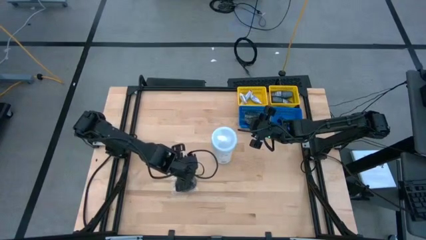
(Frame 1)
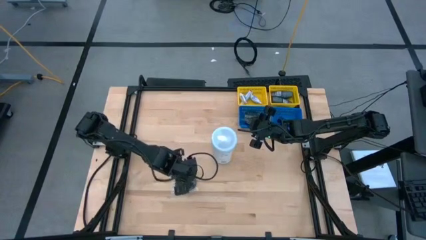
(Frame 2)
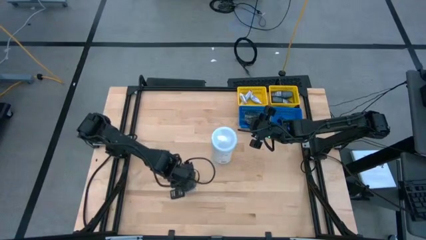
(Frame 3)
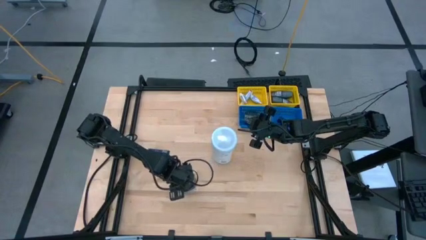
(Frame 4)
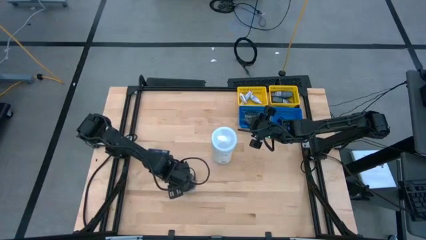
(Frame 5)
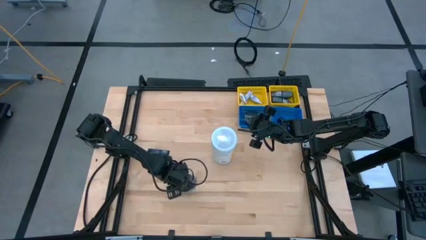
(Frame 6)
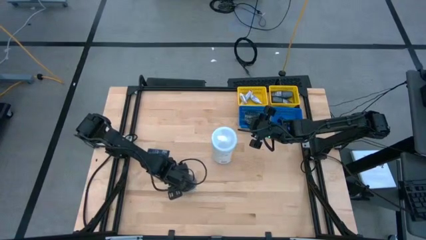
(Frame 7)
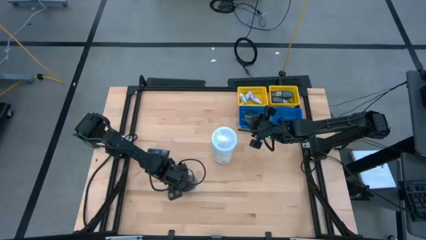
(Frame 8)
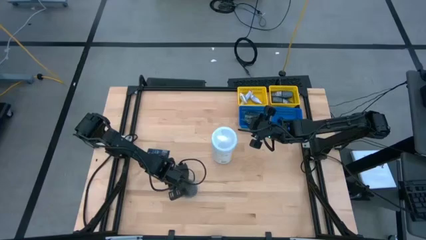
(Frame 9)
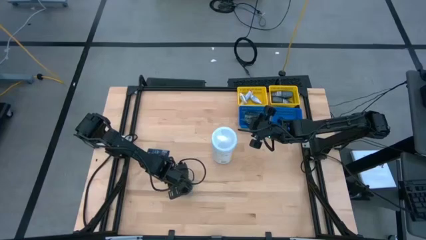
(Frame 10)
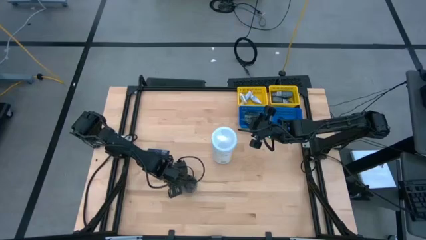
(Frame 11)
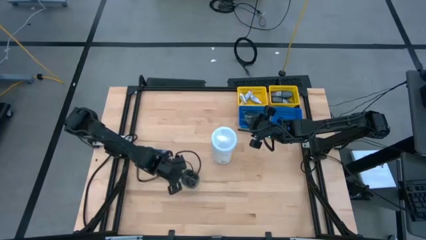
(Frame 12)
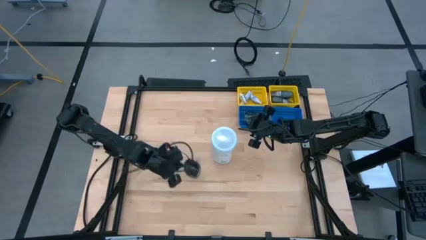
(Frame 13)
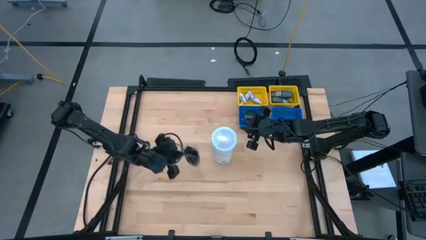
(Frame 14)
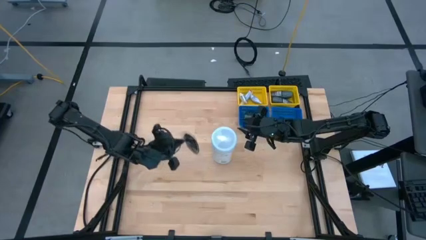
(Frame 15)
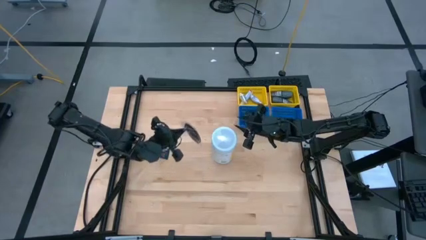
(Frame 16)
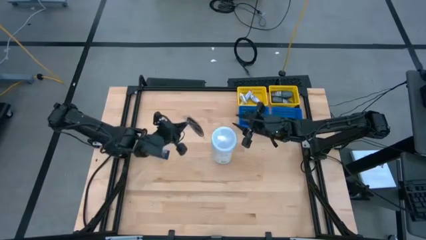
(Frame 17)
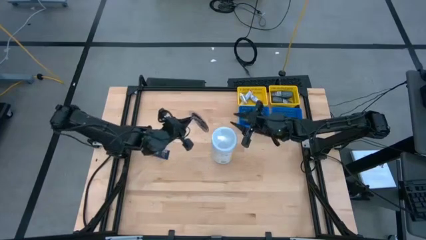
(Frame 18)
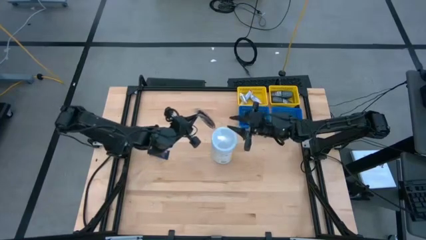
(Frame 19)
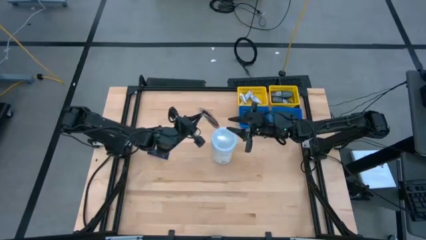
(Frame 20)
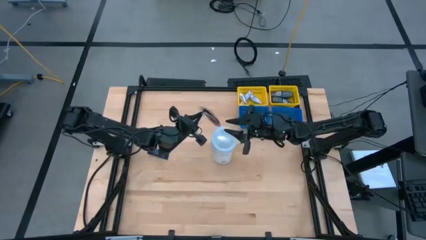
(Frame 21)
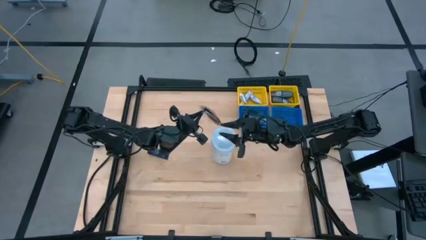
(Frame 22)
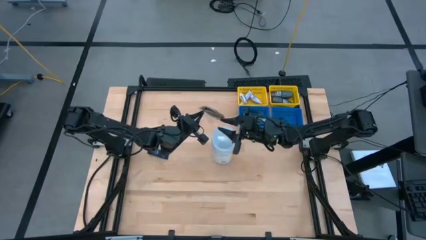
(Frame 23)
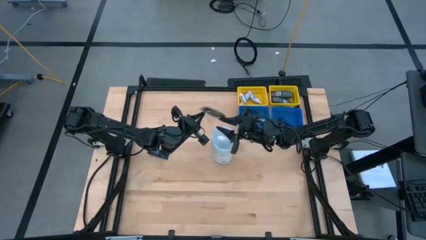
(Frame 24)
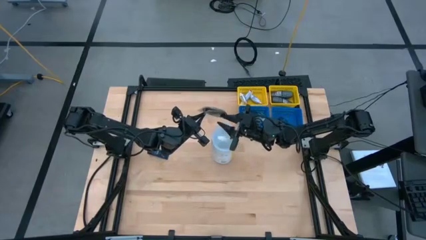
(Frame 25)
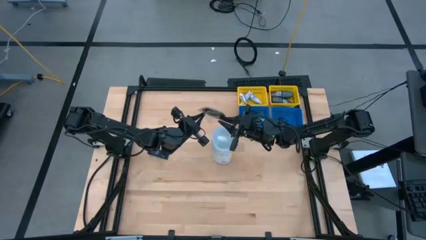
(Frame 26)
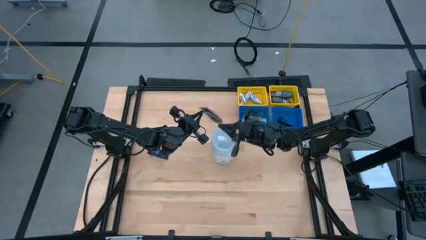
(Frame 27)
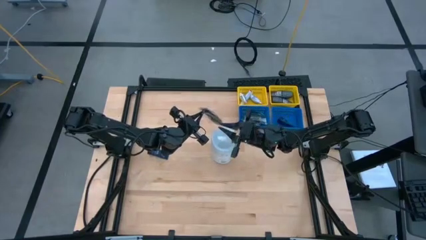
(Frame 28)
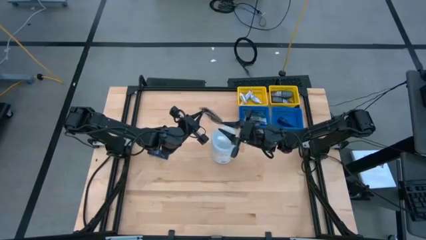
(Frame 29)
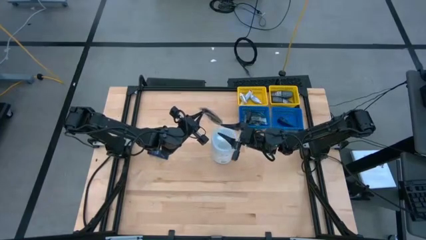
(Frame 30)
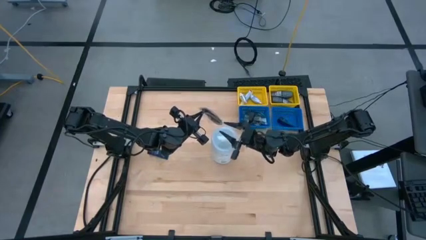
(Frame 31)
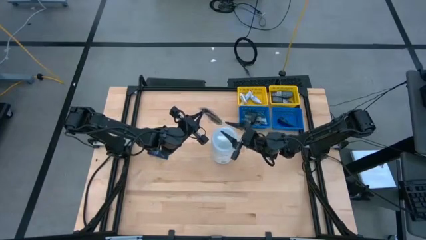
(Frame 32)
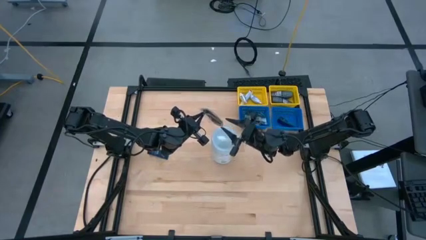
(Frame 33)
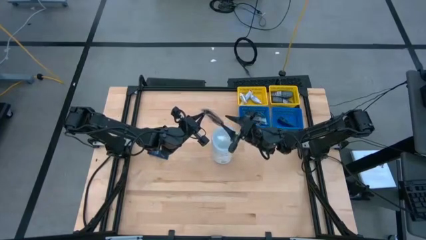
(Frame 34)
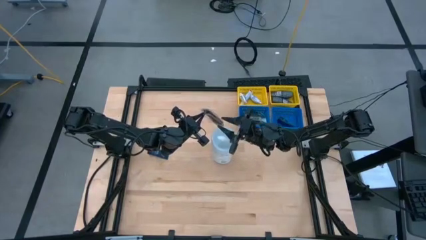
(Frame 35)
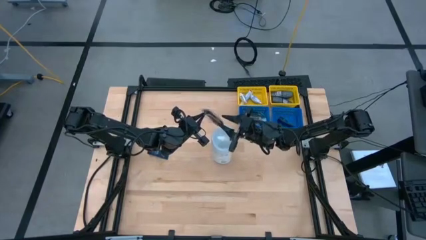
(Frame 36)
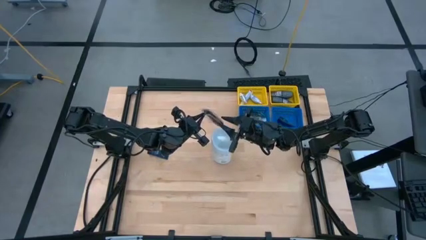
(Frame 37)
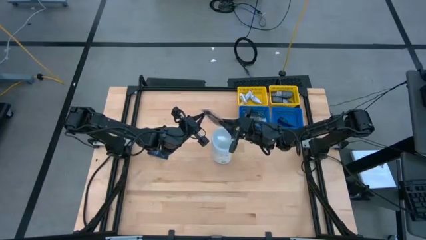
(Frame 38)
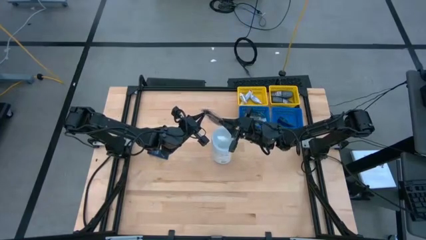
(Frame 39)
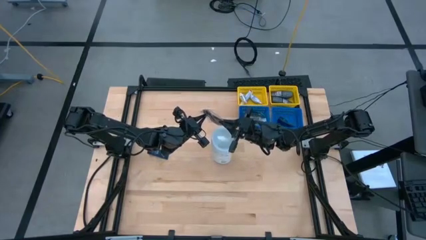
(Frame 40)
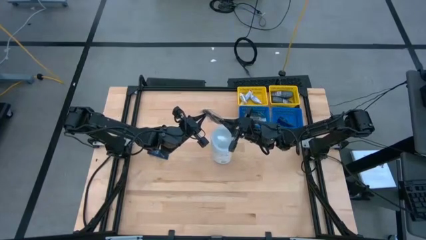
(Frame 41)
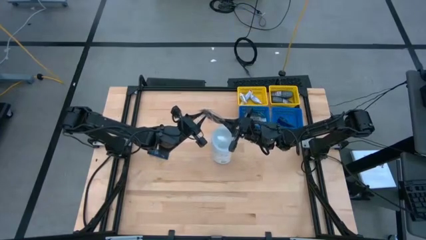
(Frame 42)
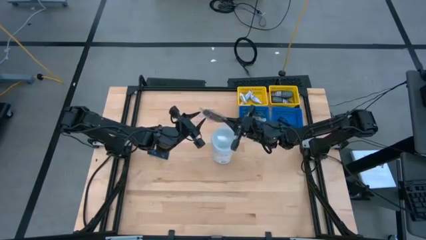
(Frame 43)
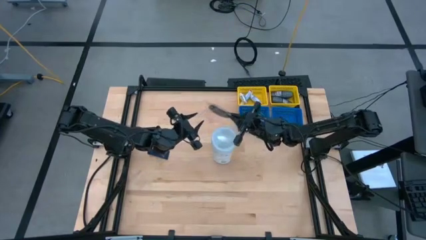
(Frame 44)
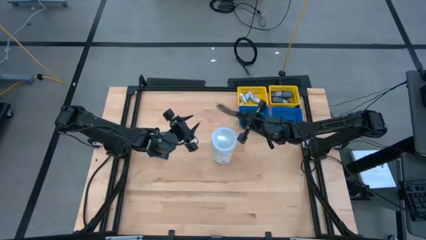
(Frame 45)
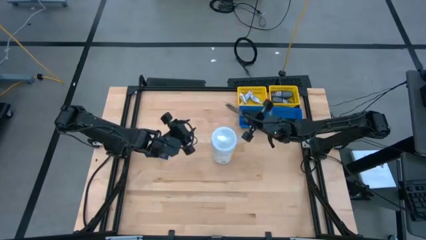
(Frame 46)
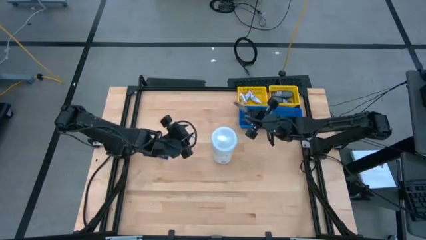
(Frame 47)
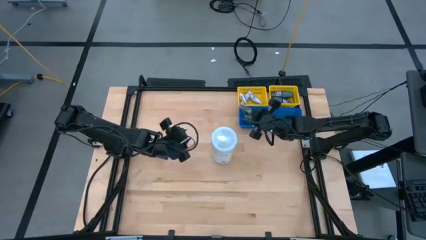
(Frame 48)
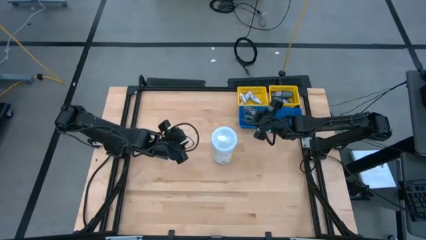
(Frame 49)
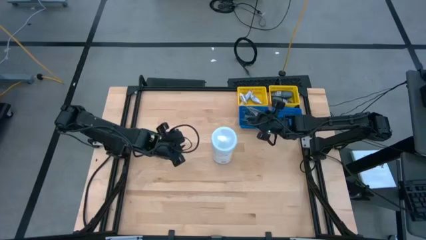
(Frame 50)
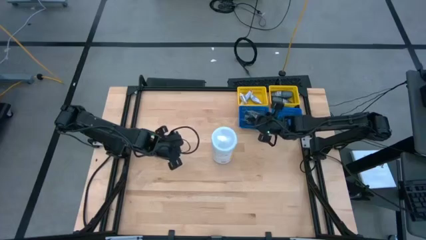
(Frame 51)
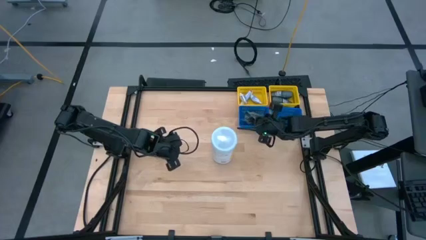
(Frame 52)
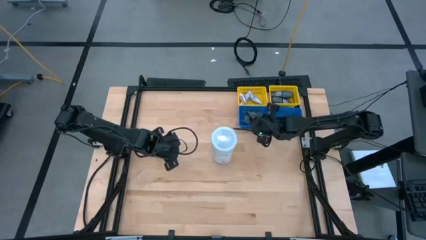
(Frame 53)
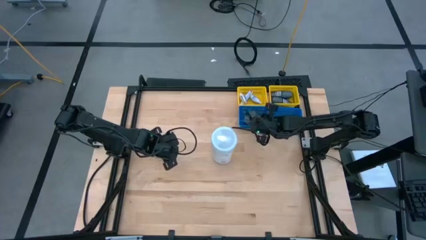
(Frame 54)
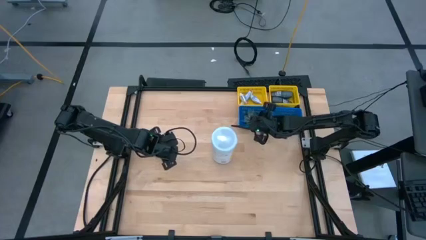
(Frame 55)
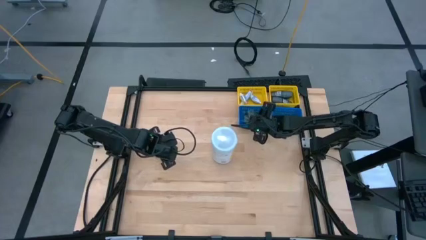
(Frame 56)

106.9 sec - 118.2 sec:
Task: Pick & Place Travel size toiletries
Put the black hair brush into the left blue bin

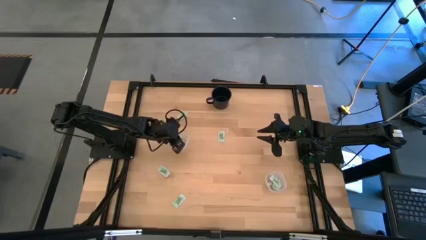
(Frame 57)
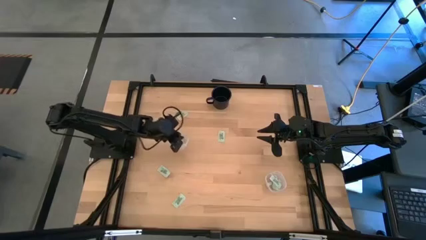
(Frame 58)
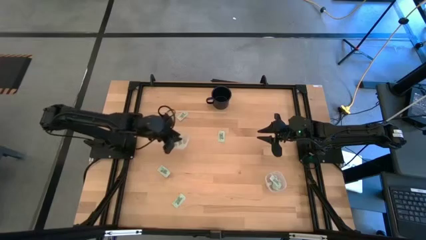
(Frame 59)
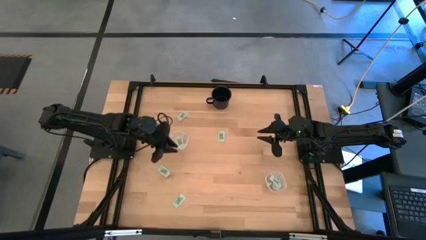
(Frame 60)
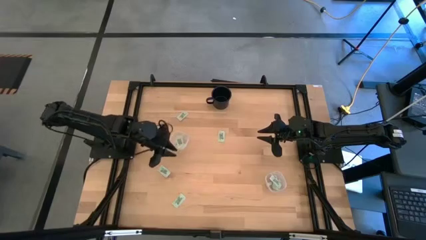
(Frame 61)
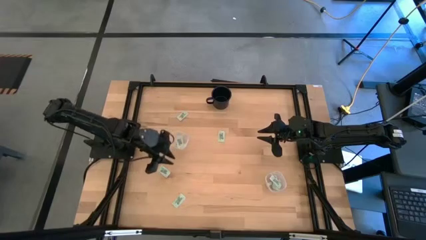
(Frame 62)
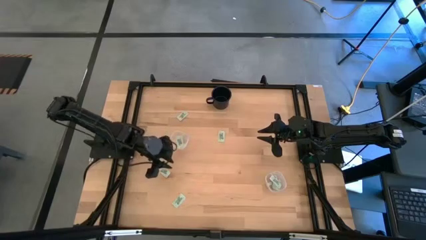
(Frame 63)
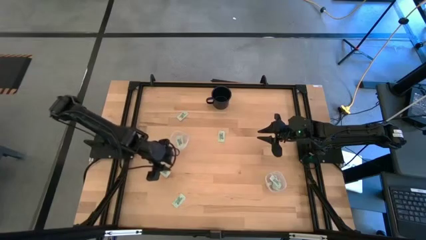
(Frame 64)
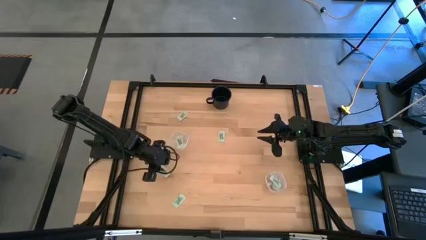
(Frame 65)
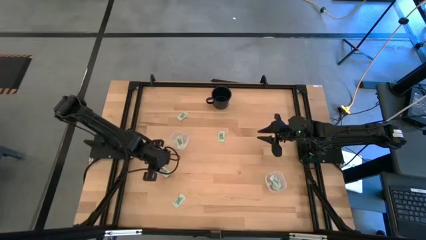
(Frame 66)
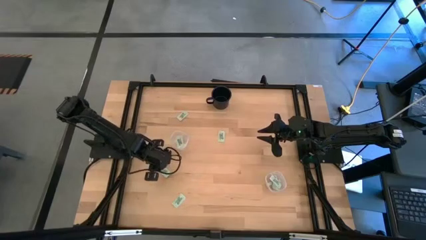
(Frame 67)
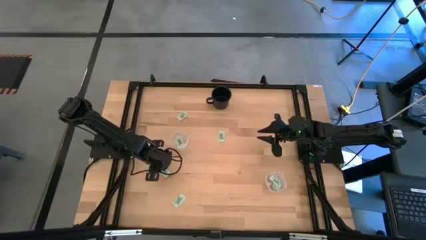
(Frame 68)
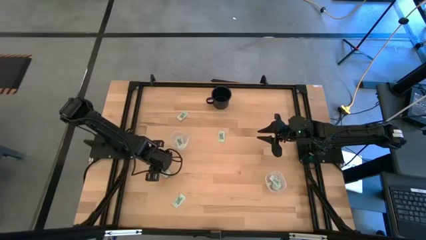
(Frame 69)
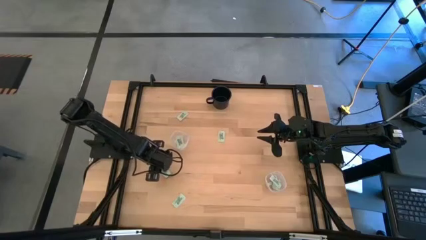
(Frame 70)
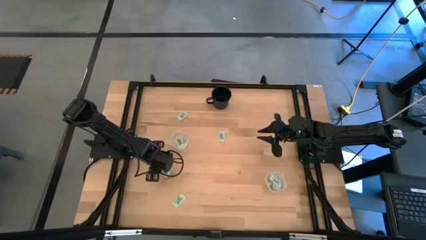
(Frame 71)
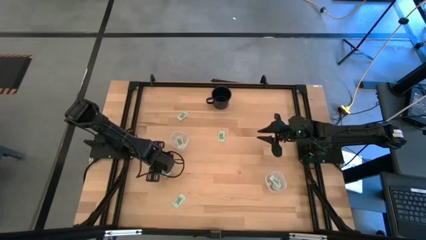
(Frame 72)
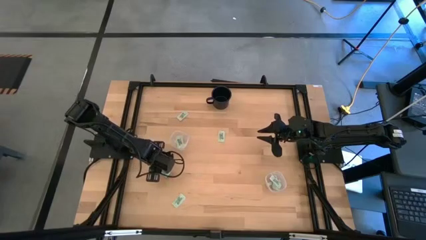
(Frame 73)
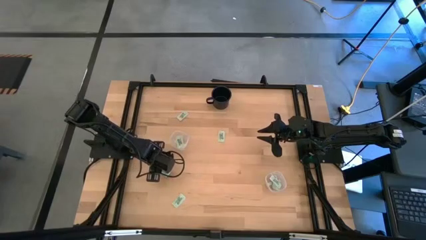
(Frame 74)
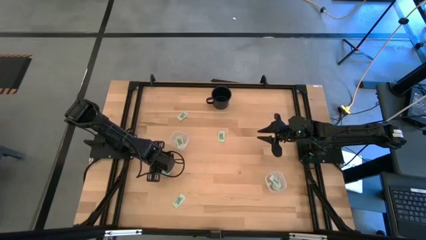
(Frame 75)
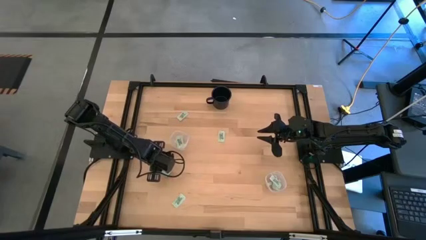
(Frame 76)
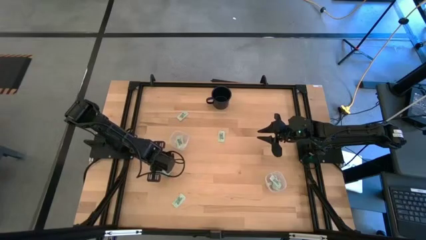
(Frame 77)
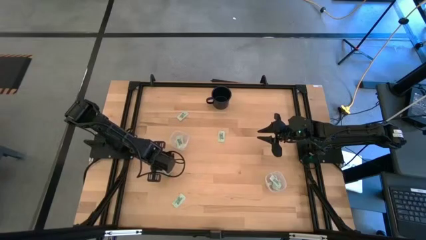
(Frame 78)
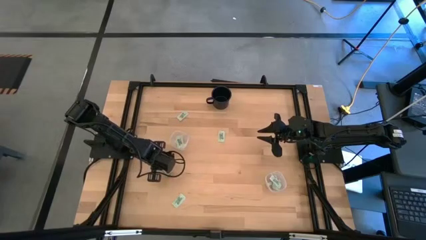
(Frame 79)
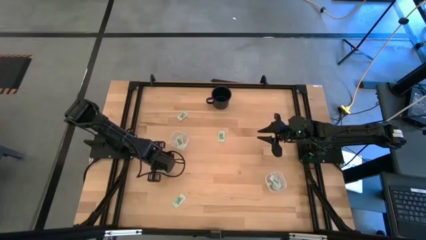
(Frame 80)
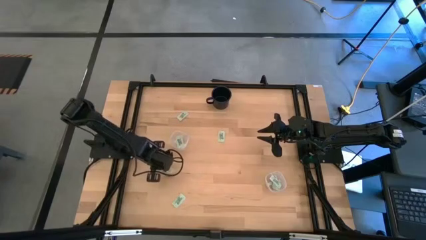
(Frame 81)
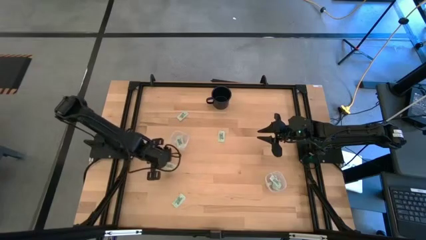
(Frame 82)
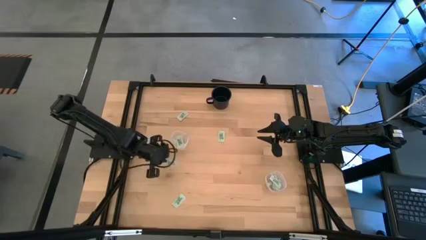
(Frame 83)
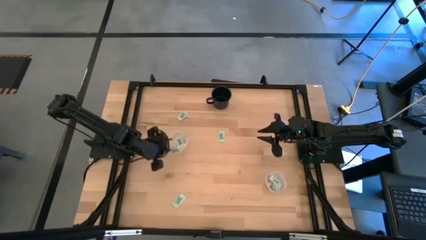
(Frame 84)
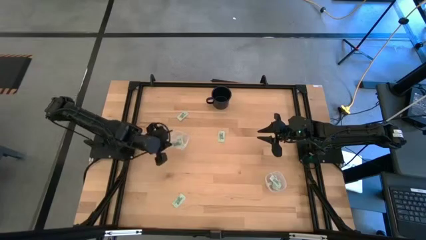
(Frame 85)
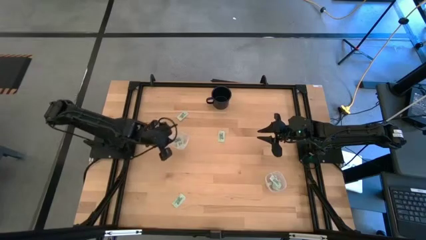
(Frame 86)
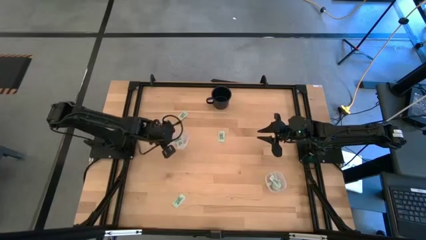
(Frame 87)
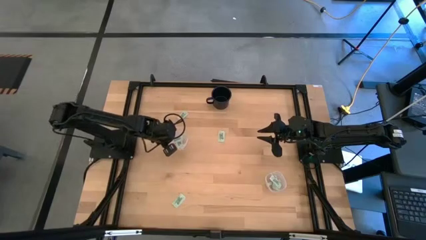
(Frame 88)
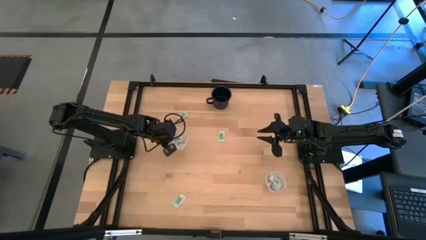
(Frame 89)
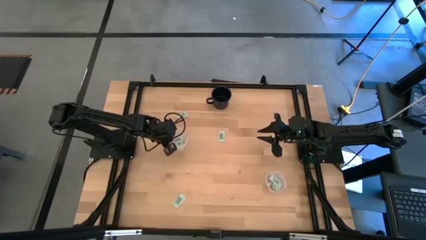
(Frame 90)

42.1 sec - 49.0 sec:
Task: Pick and place items into bin
Put the white stevia packet into the top transparent bin
